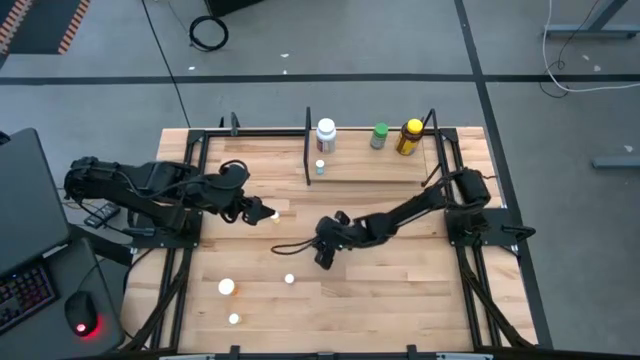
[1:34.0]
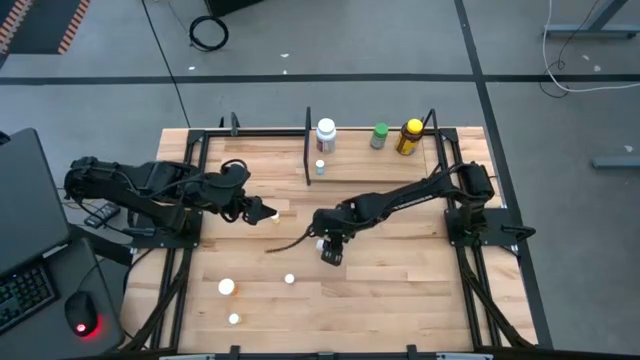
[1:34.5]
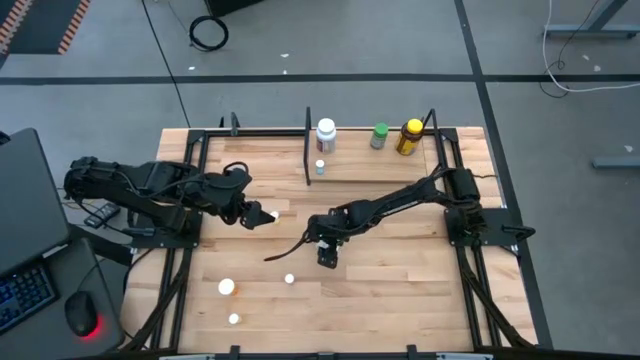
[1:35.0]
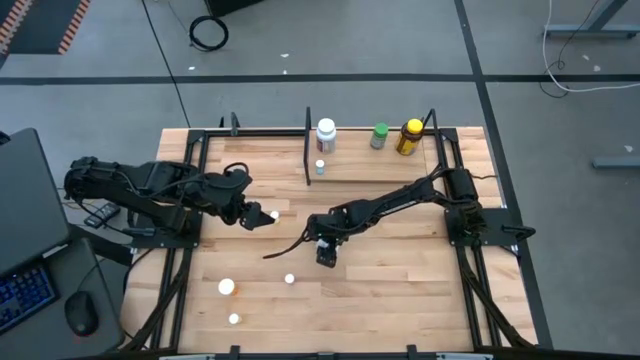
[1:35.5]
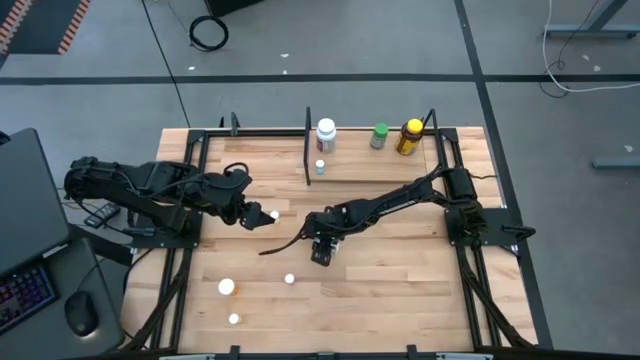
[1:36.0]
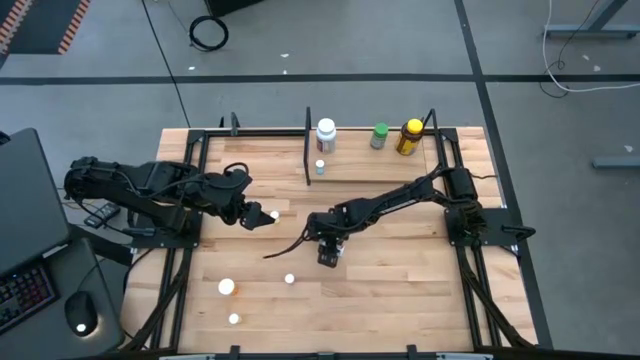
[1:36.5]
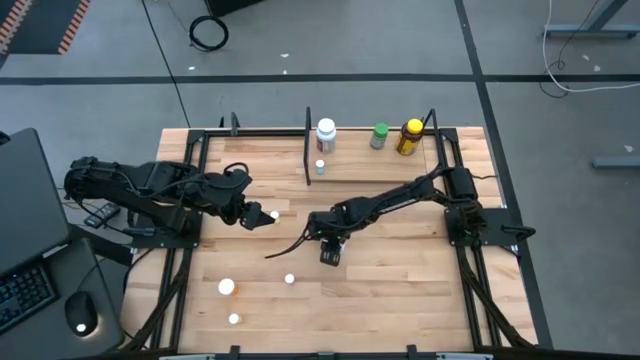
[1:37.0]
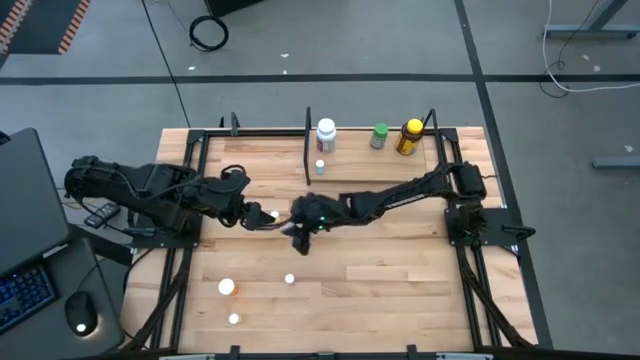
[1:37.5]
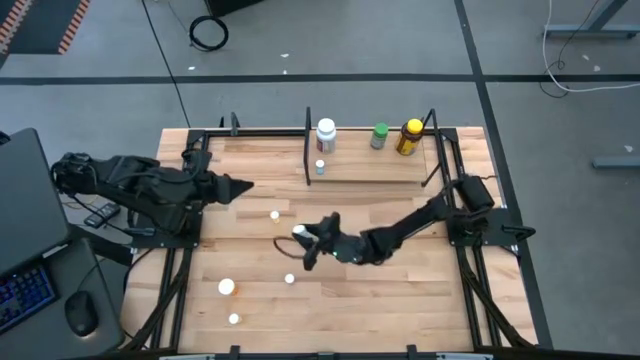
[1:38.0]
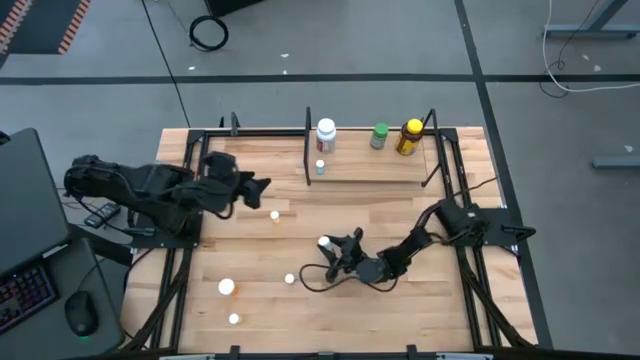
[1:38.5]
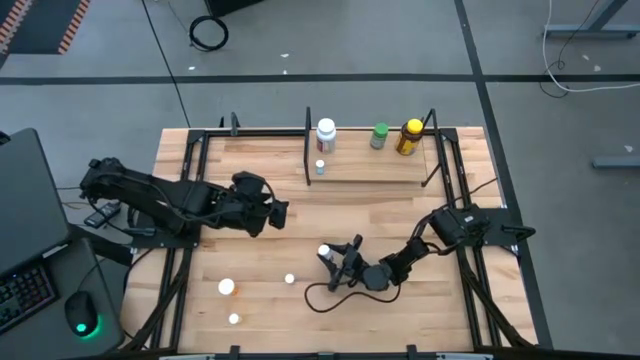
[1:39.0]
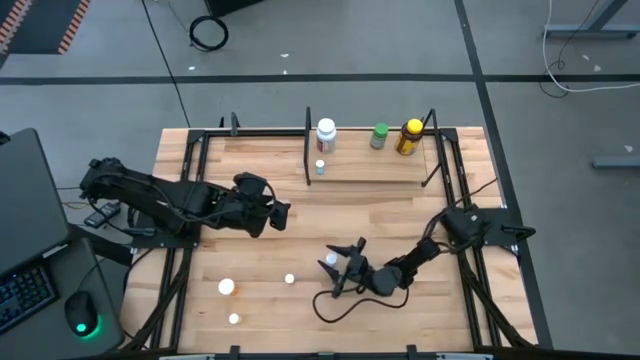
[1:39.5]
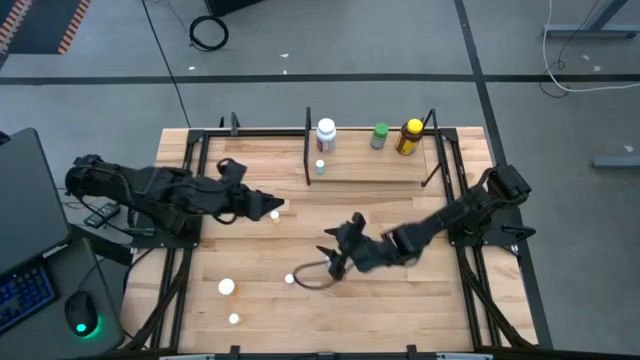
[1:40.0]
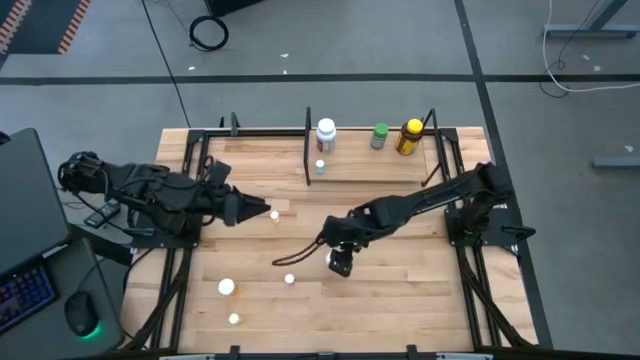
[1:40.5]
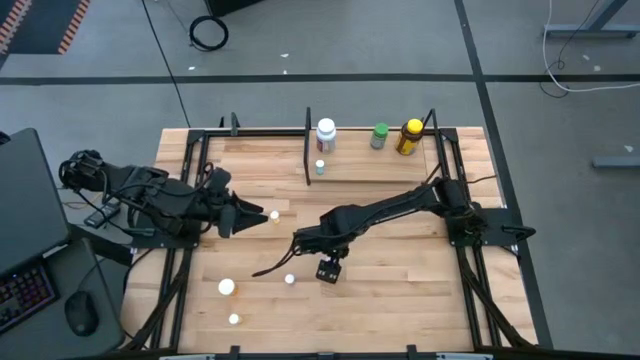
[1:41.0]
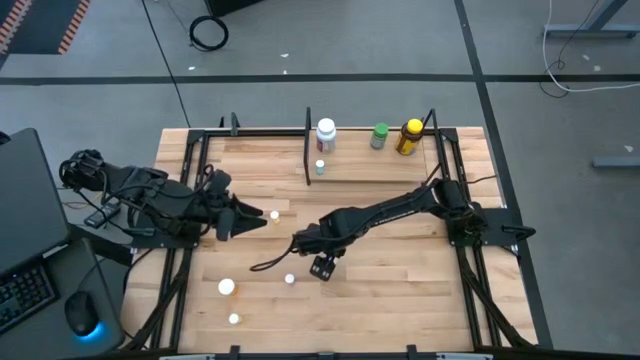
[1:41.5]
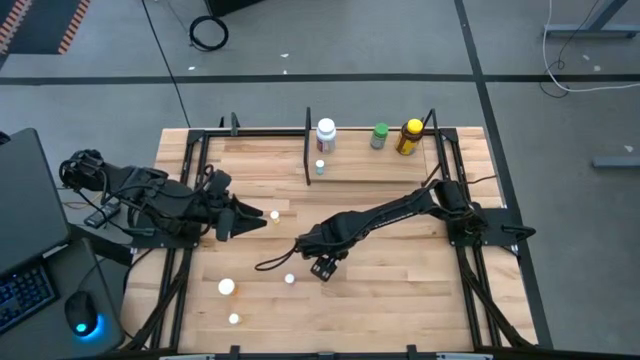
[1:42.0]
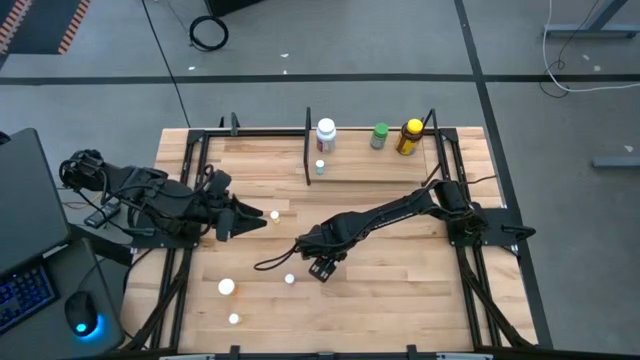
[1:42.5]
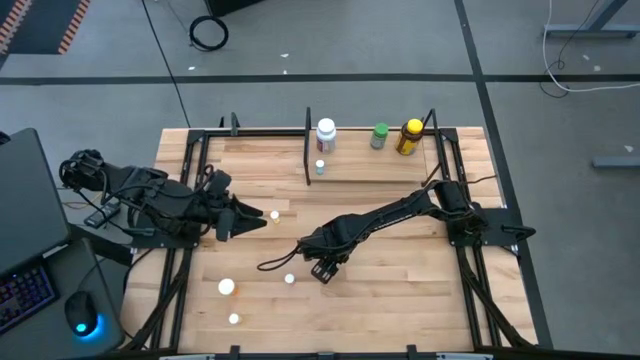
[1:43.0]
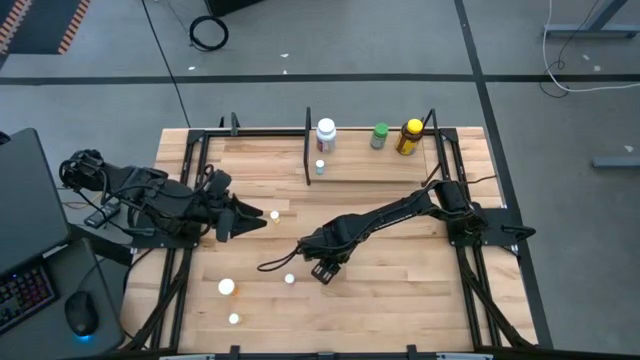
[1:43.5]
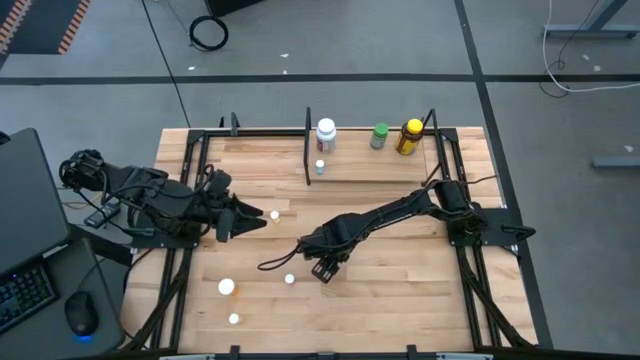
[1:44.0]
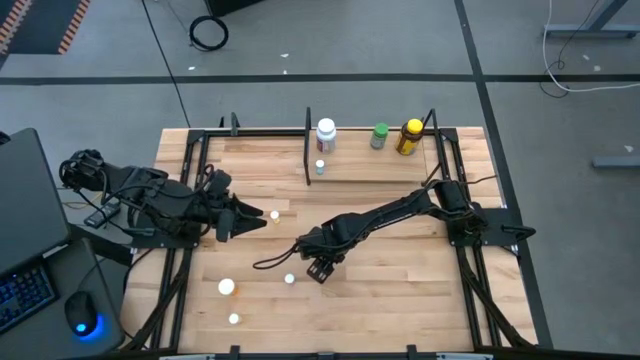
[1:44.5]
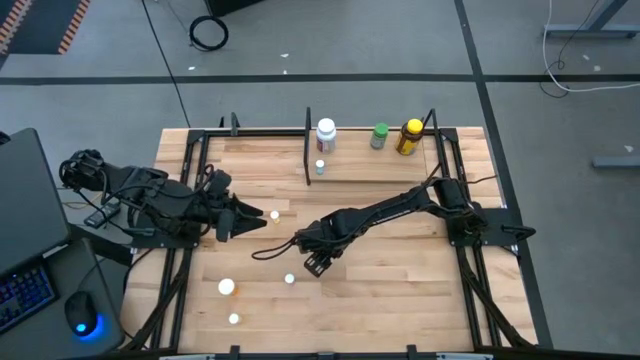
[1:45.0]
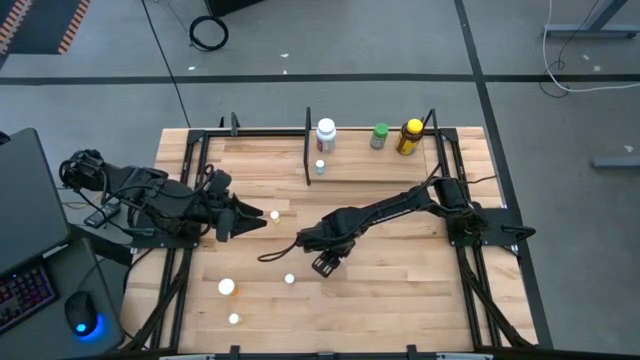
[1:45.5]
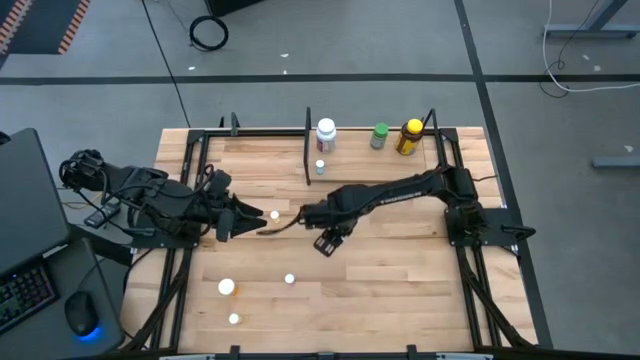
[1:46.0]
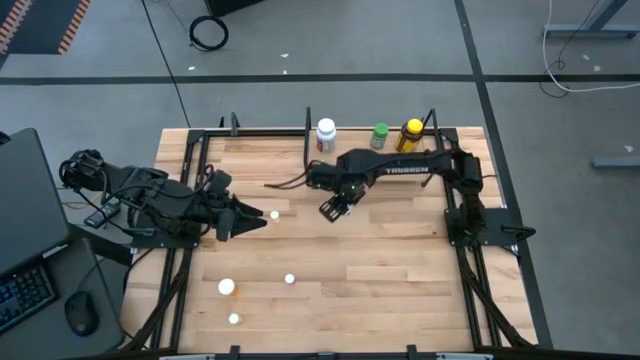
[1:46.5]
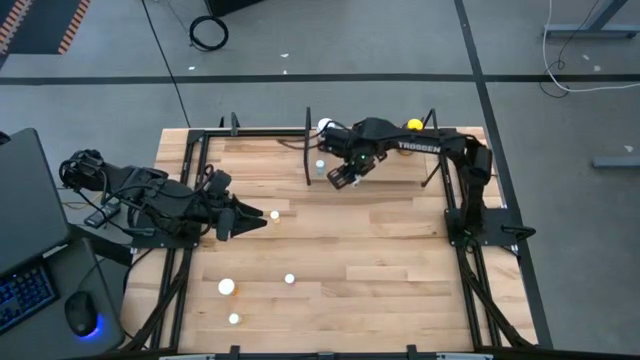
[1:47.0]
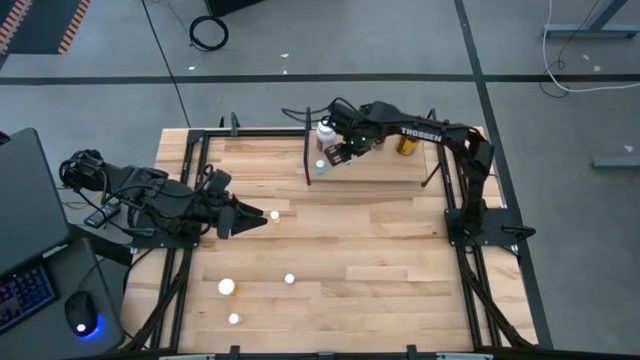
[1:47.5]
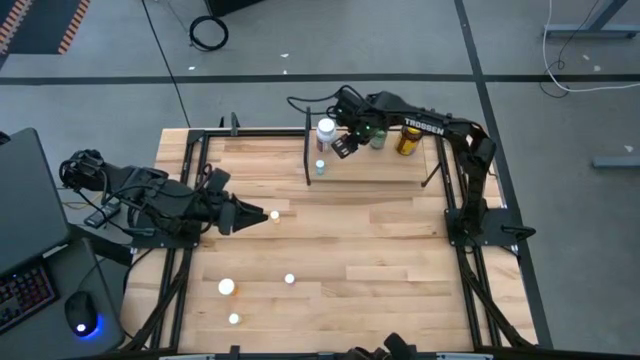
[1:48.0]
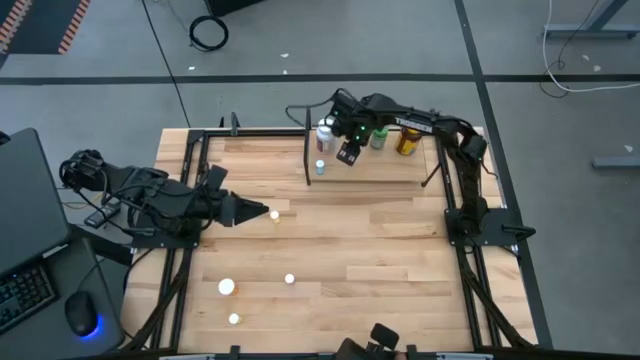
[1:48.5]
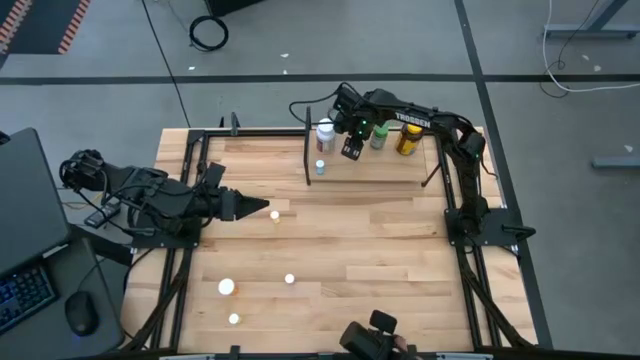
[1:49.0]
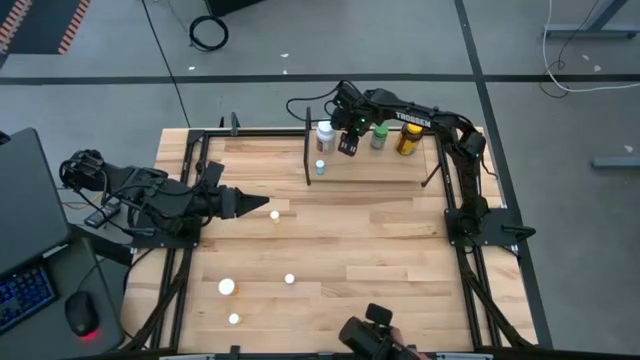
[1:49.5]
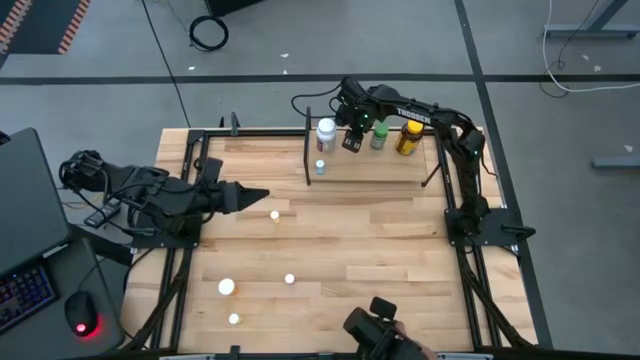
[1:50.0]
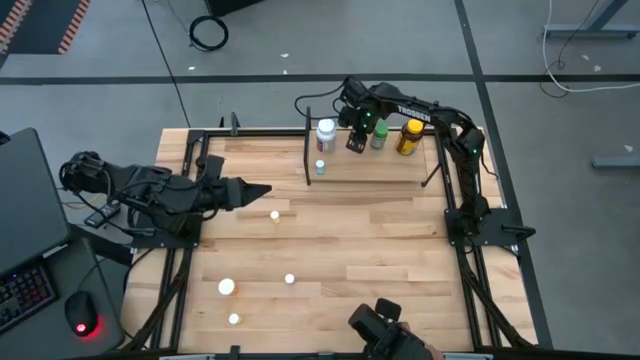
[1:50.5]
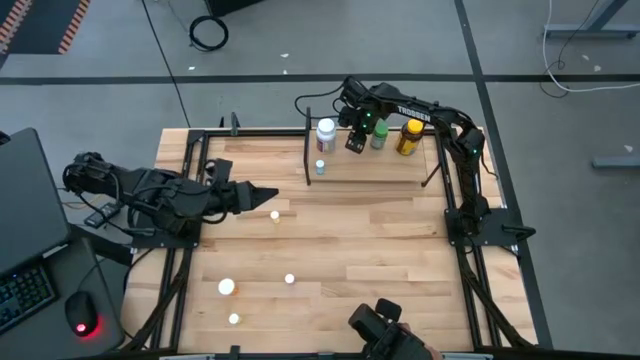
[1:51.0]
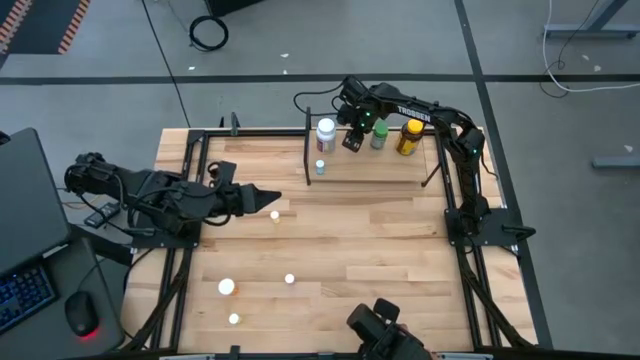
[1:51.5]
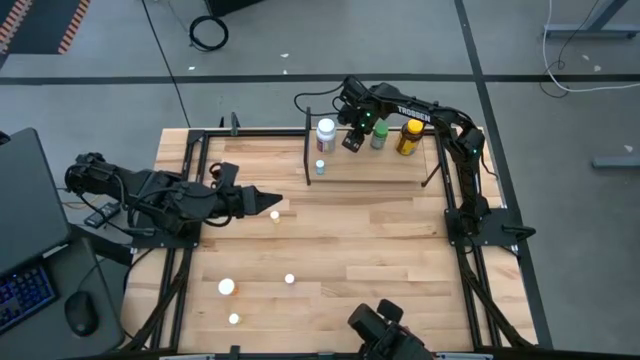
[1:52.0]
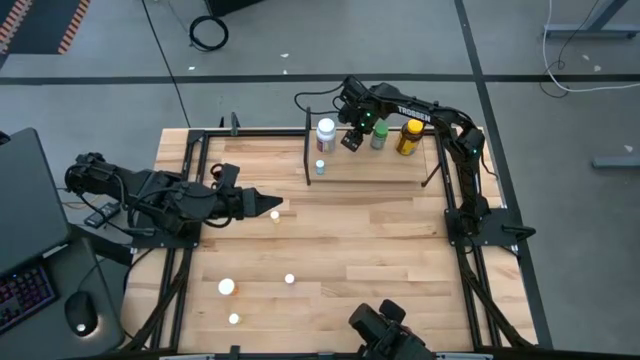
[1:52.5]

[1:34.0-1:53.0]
Task: Pick and place medicine bottles onto shelf by color
Put the small white bottle pill bottle on the shelf
